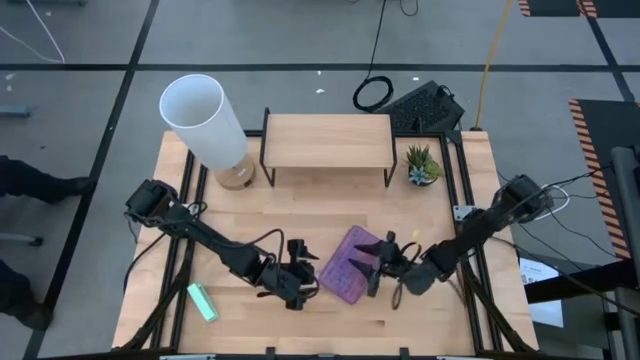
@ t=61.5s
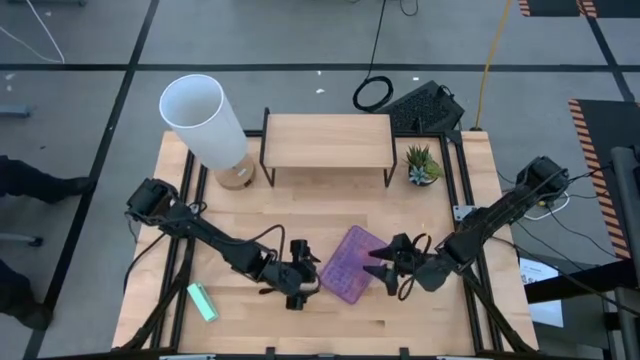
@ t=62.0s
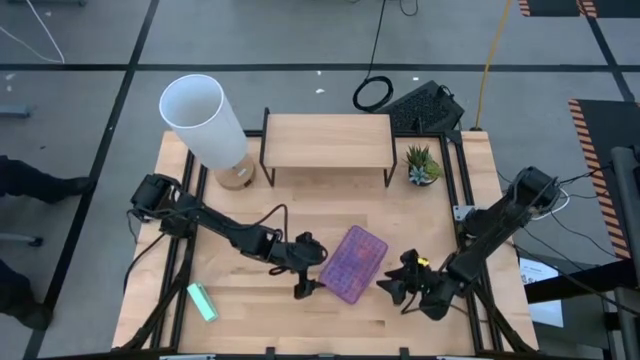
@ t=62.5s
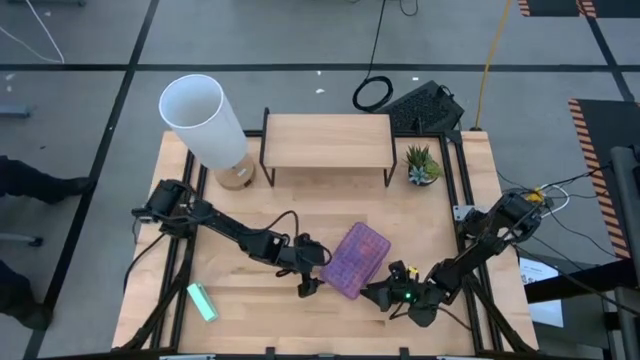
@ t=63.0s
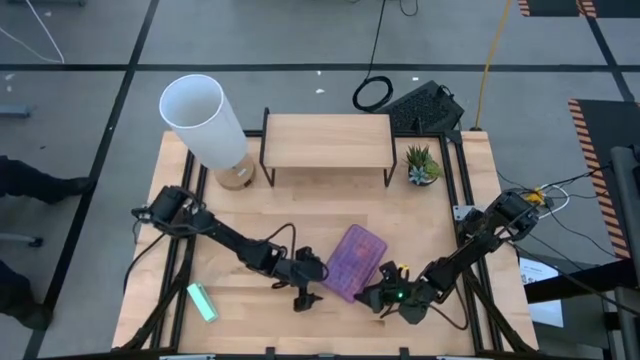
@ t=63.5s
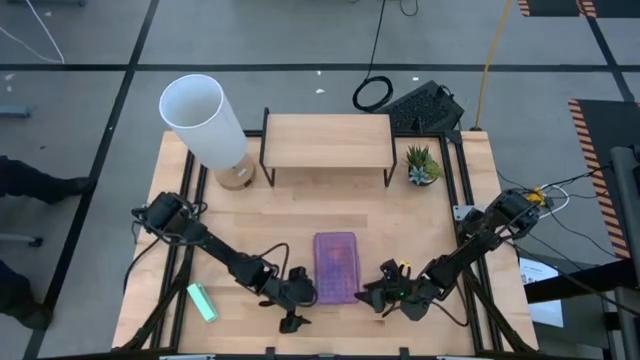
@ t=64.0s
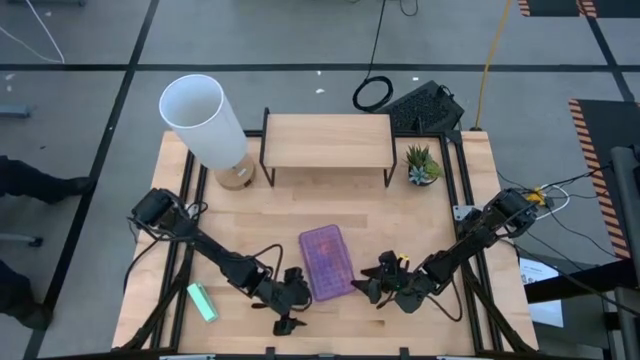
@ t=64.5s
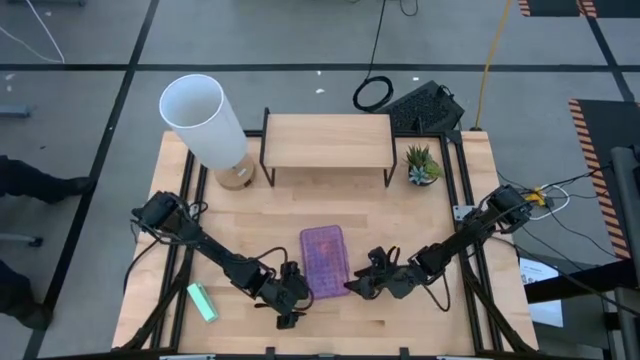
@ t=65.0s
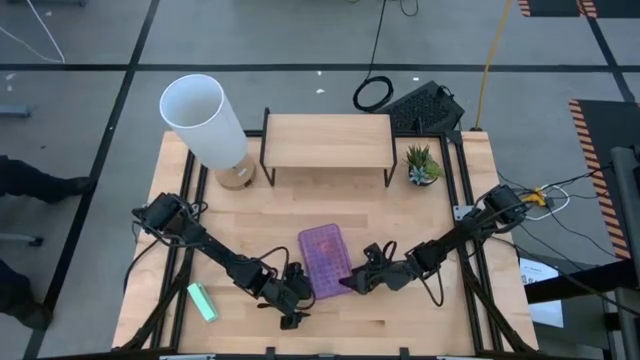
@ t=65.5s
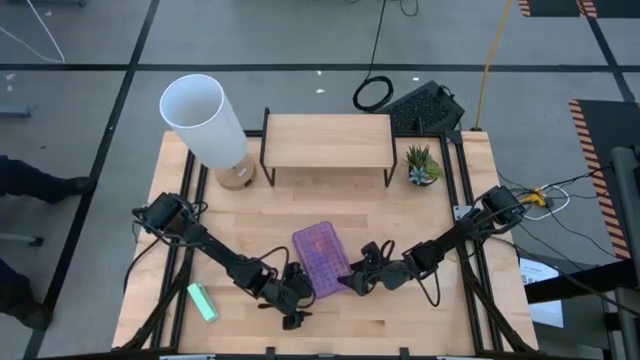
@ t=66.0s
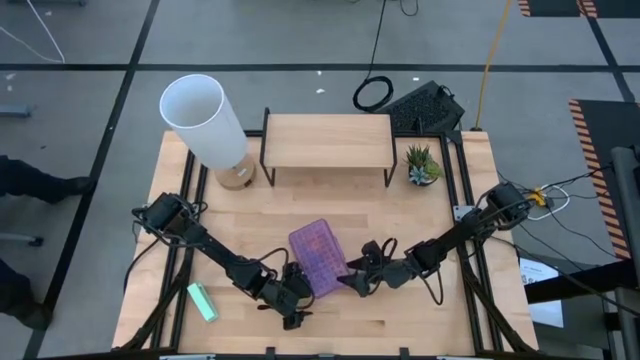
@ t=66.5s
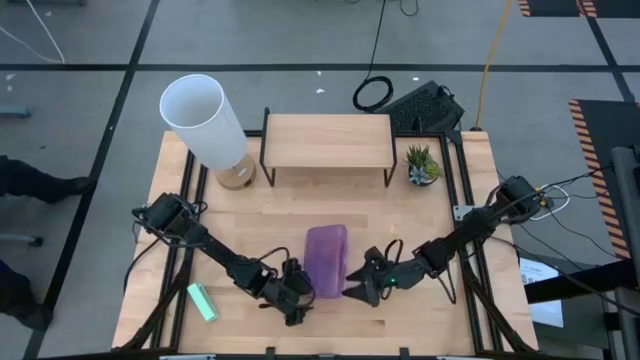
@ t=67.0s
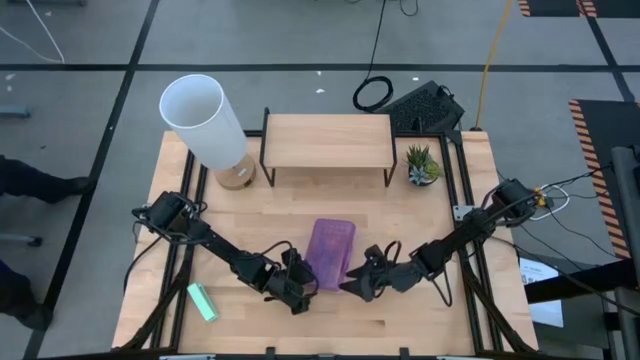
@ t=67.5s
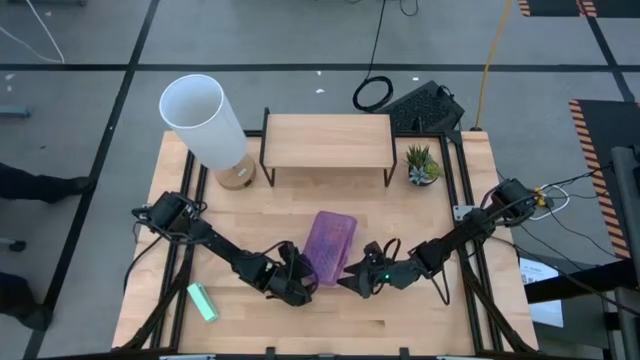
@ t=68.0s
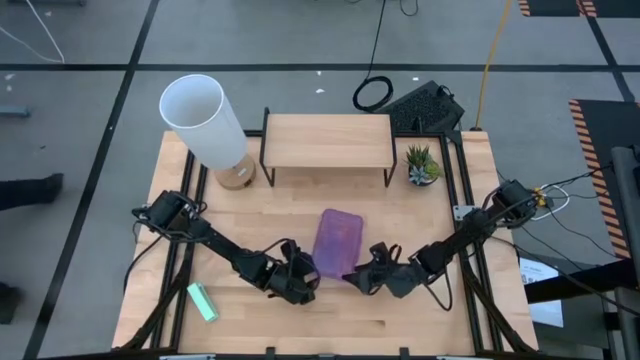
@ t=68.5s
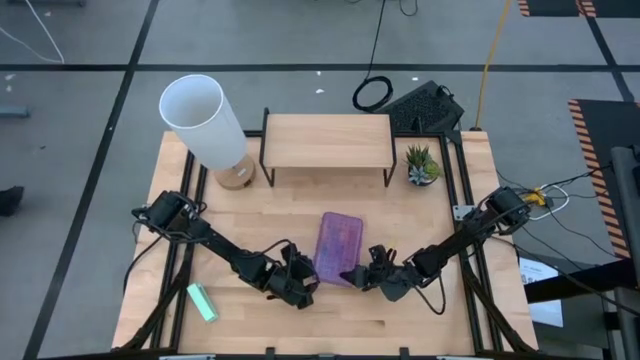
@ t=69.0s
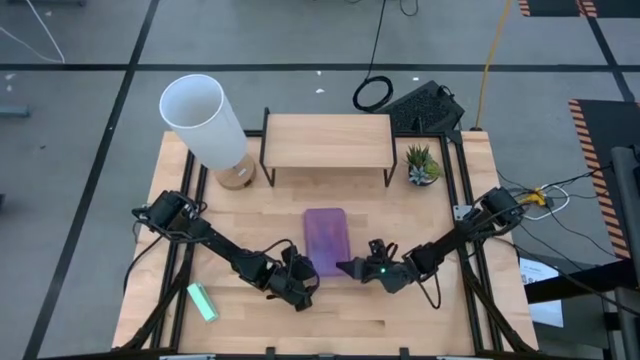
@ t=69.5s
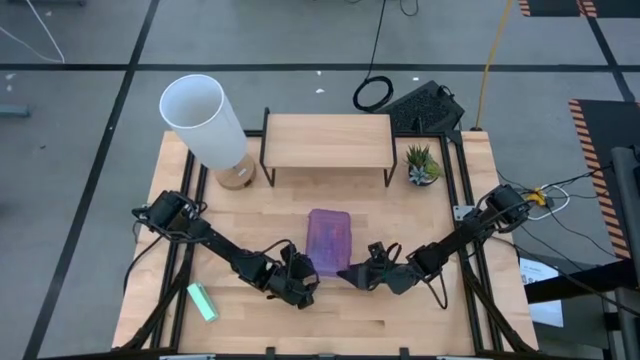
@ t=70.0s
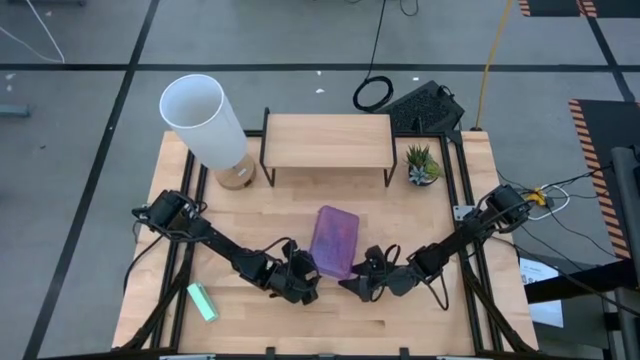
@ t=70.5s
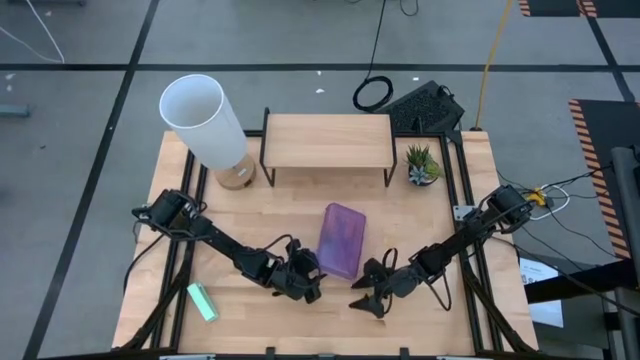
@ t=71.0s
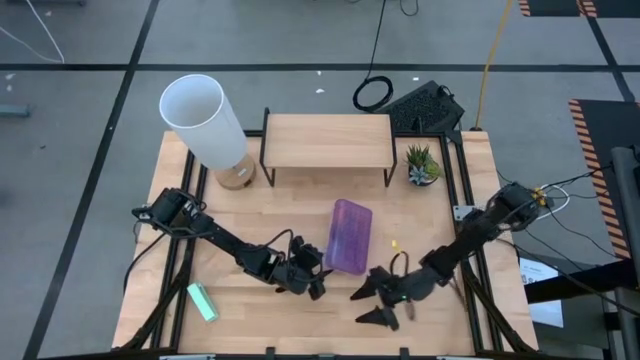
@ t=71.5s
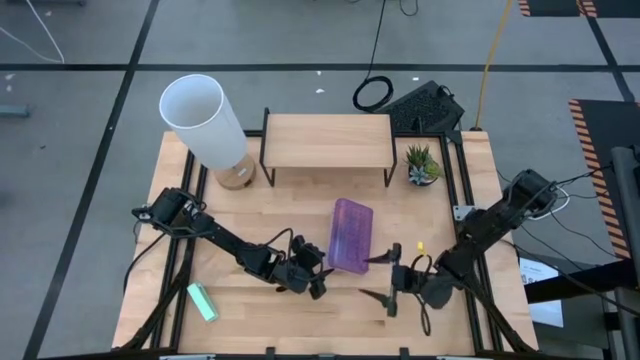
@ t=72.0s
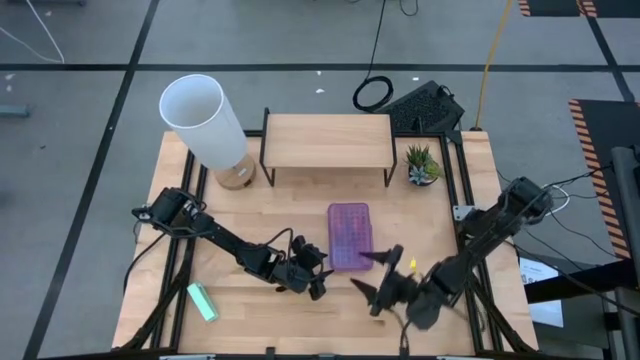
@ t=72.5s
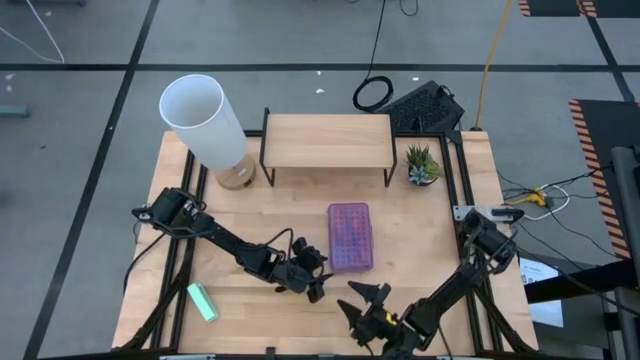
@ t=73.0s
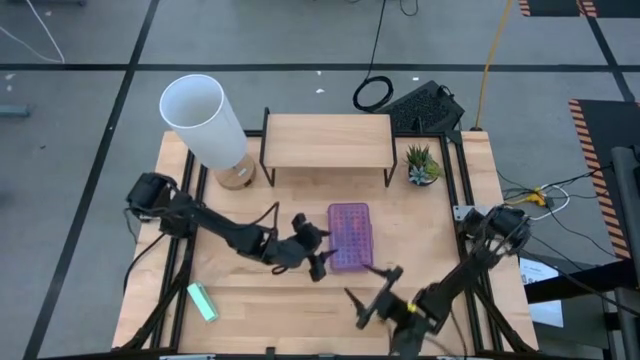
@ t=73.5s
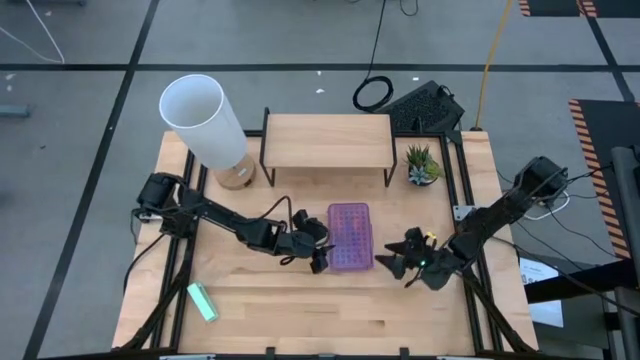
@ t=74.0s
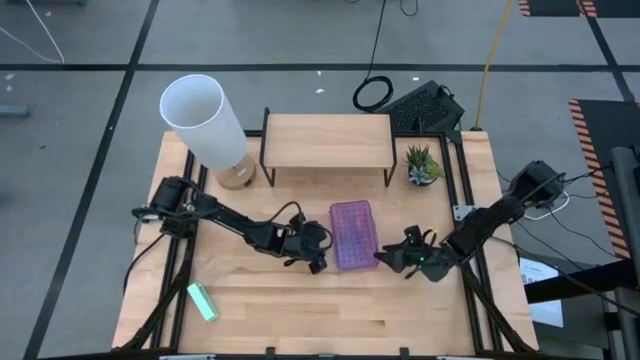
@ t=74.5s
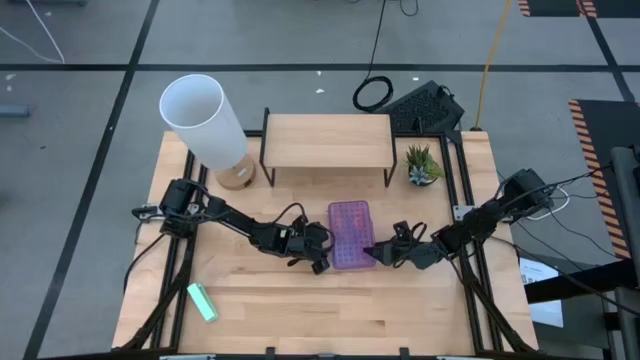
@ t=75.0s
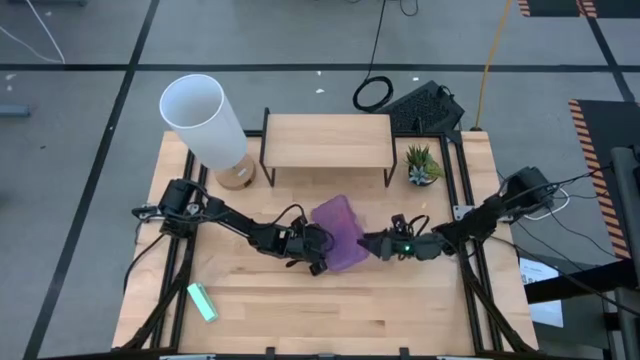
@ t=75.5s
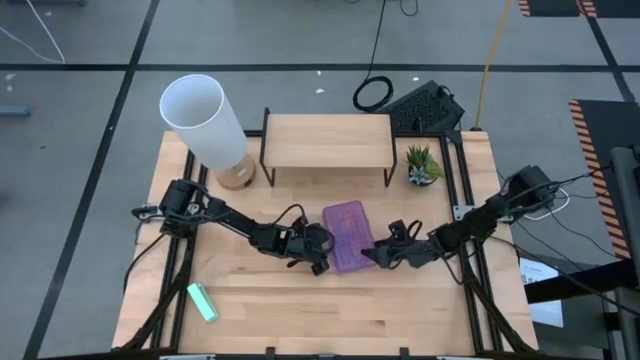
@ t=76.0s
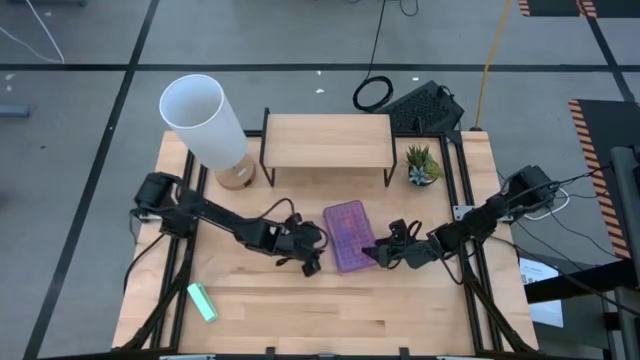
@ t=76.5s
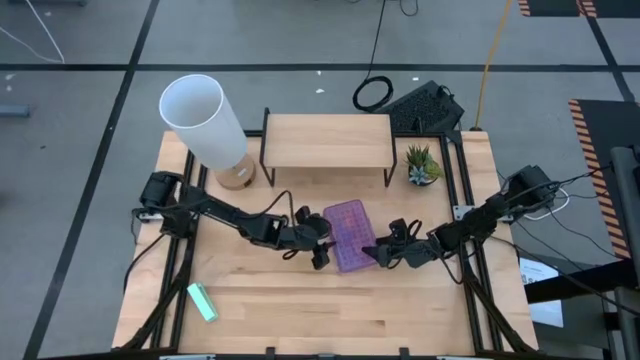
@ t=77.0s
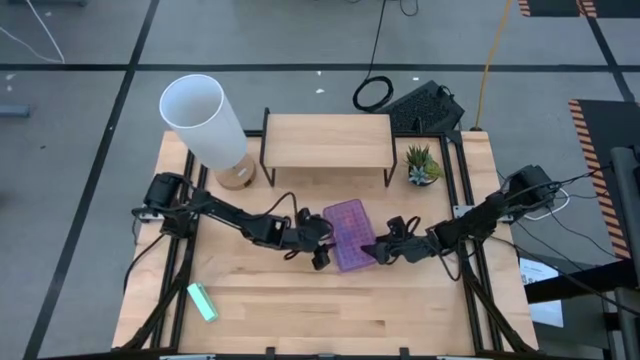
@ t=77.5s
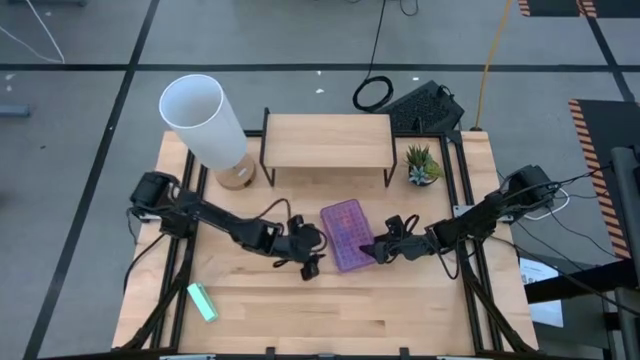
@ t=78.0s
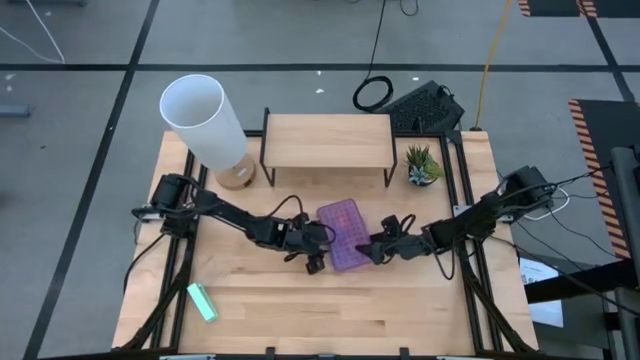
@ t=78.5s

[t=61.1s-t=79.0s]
Task: Pack school essentials
Put the transparent violet supply box on the shelf

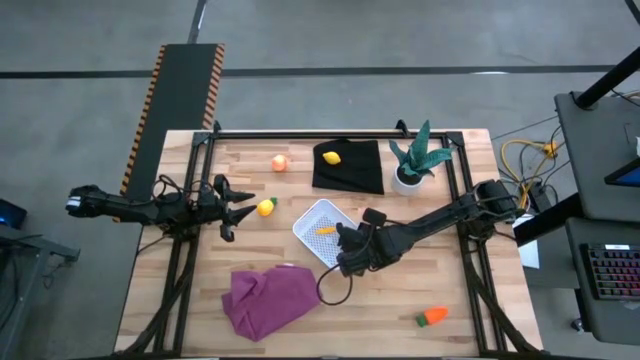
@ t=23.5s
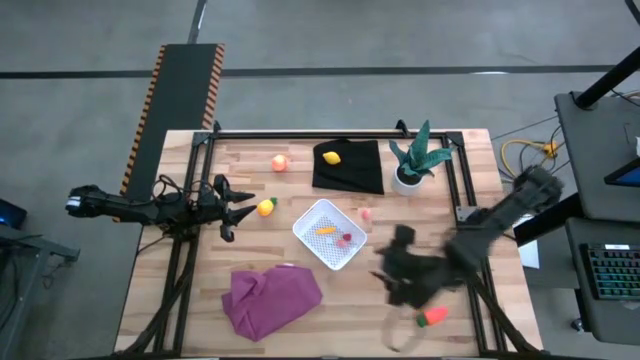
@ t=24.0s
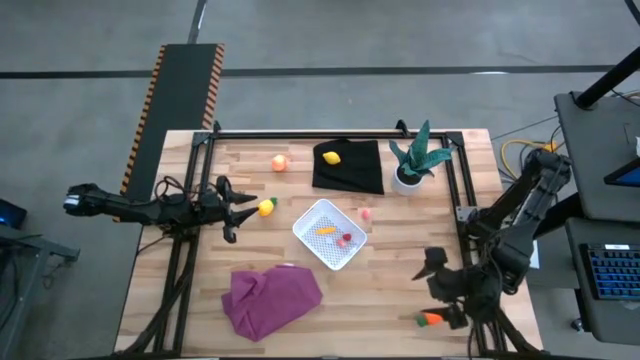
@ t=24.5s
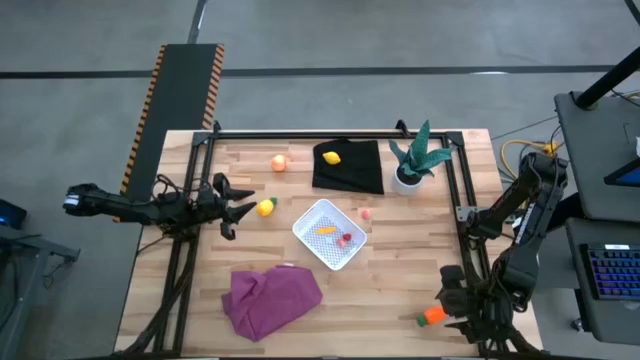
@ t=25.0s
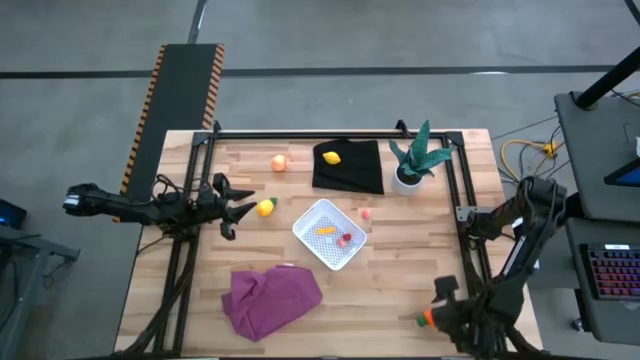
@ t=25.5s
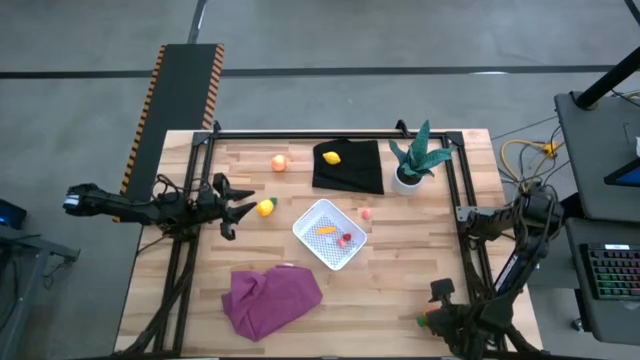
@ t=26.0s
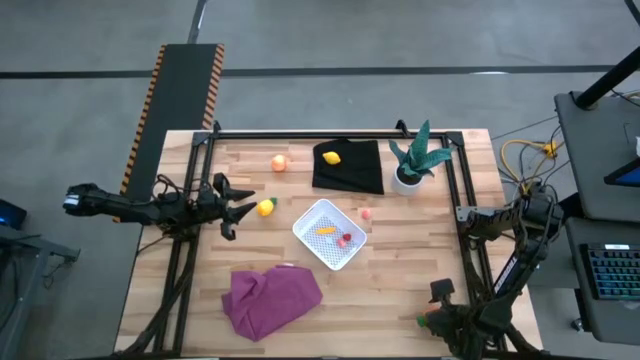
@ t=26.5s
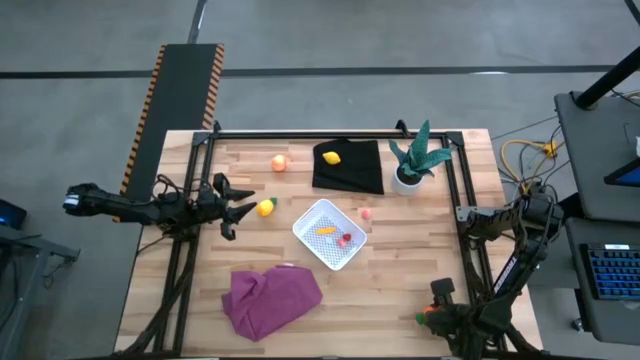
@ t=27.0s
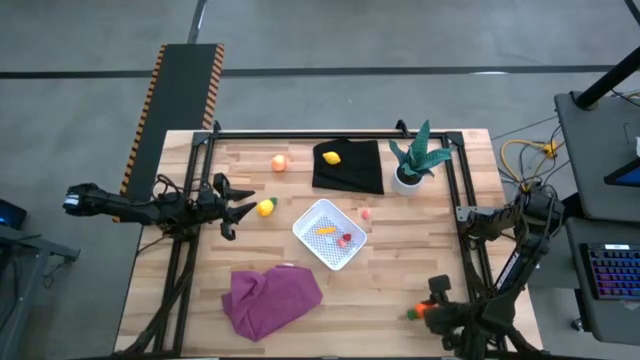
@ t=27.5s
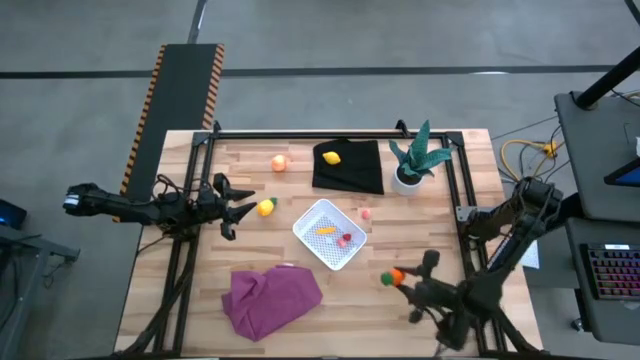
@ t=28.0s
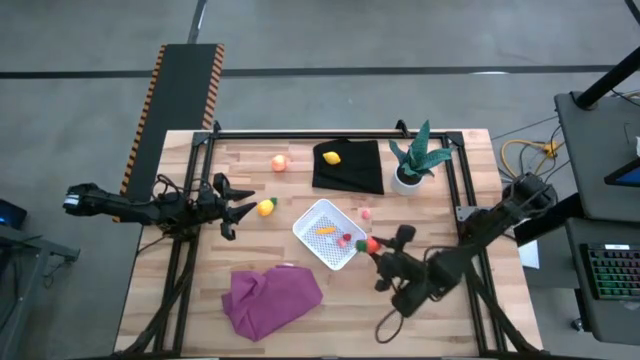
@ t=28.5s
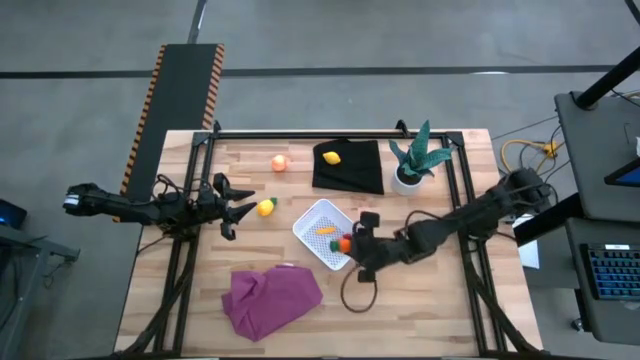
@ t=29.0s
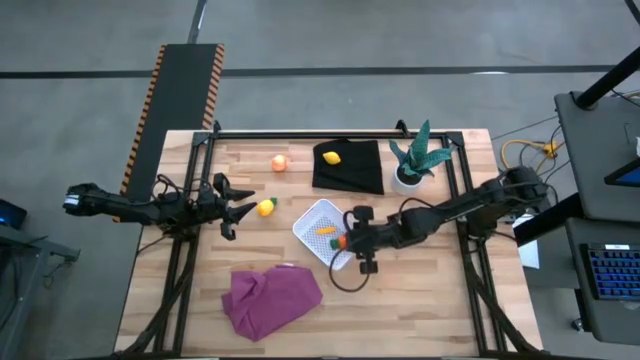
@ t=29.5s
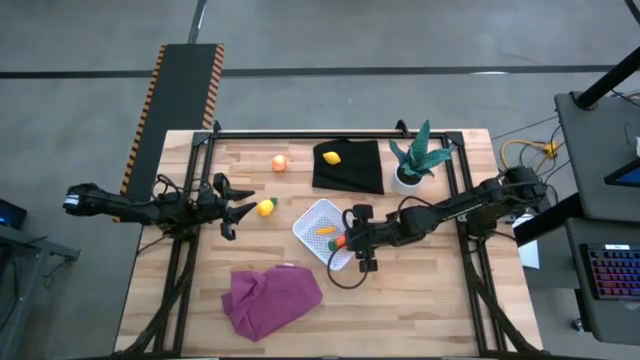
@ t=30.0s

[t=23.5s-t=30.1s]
Task: Pick and placing Produce into tupperware
Put the carrot into the white bin
